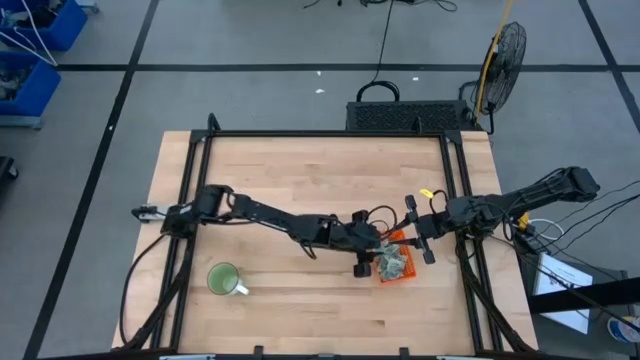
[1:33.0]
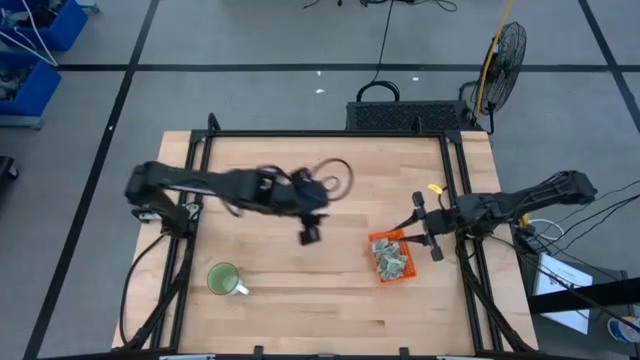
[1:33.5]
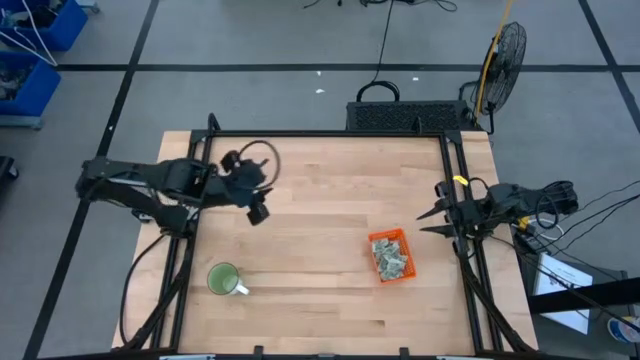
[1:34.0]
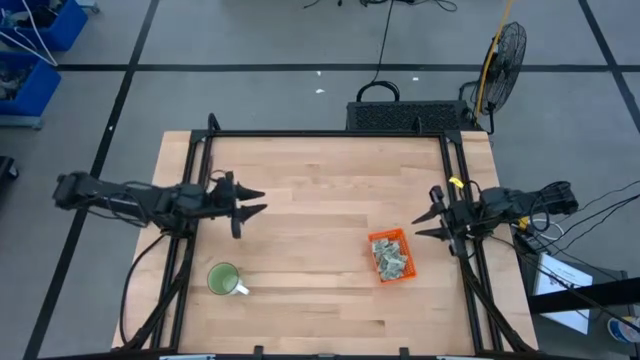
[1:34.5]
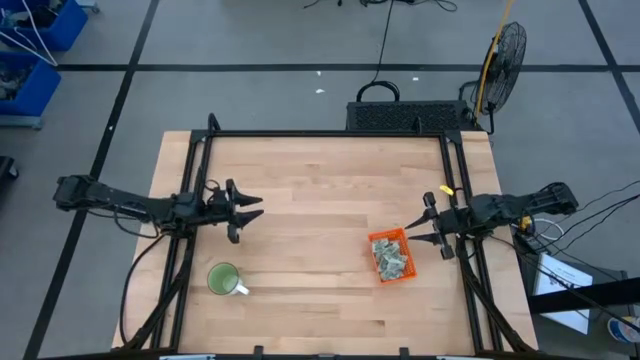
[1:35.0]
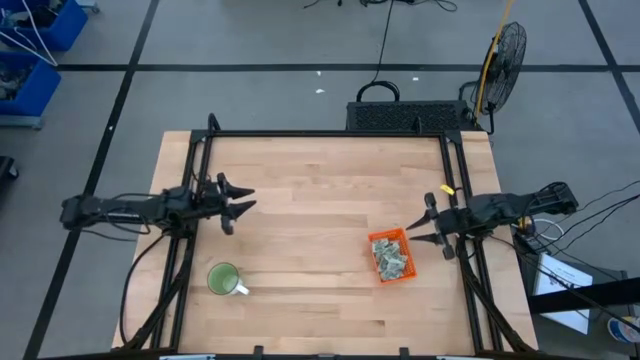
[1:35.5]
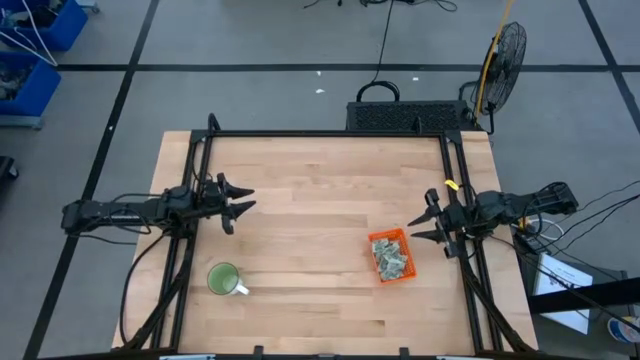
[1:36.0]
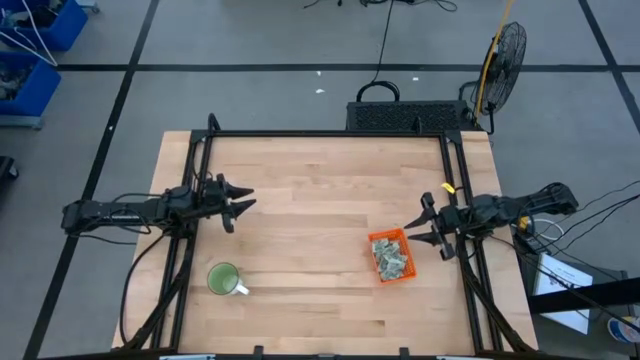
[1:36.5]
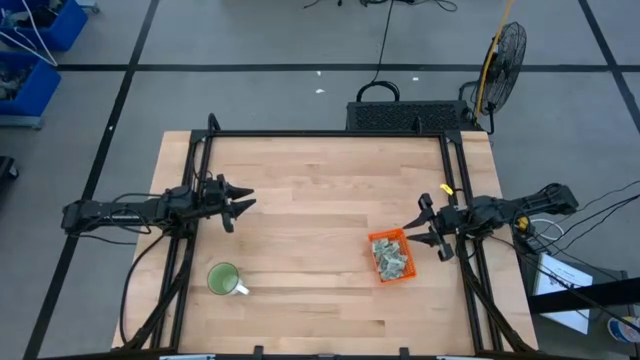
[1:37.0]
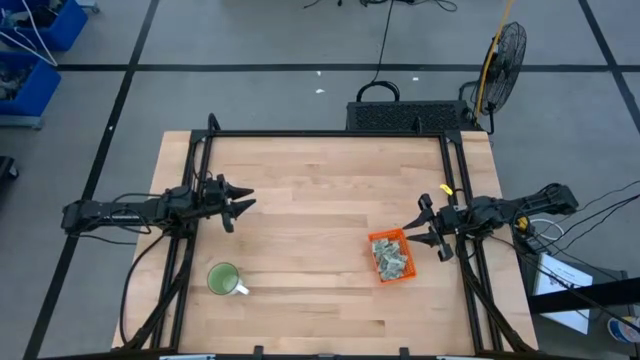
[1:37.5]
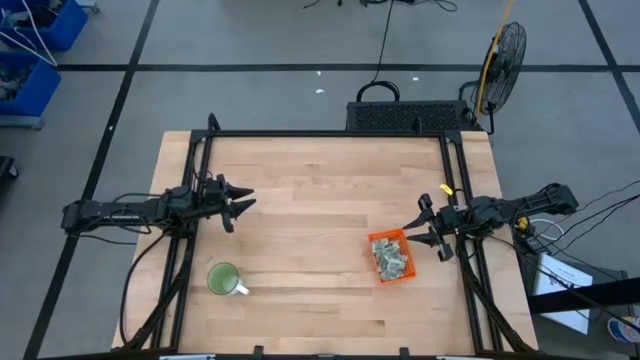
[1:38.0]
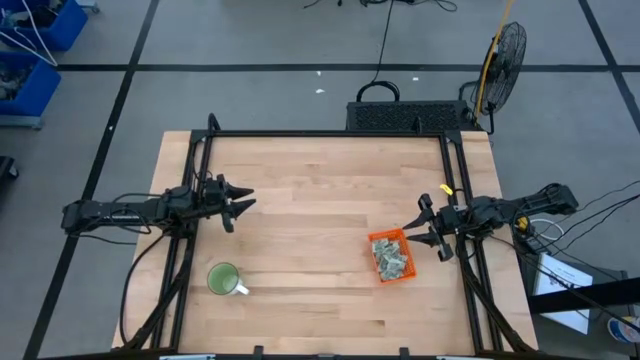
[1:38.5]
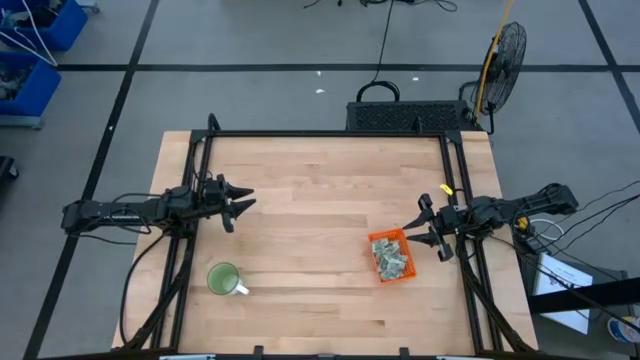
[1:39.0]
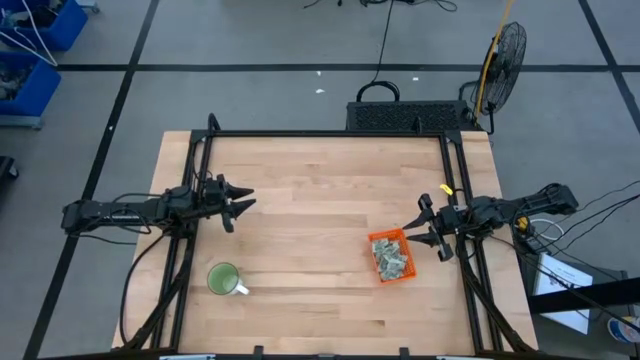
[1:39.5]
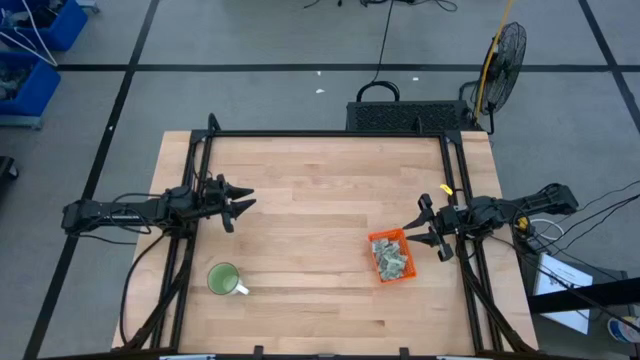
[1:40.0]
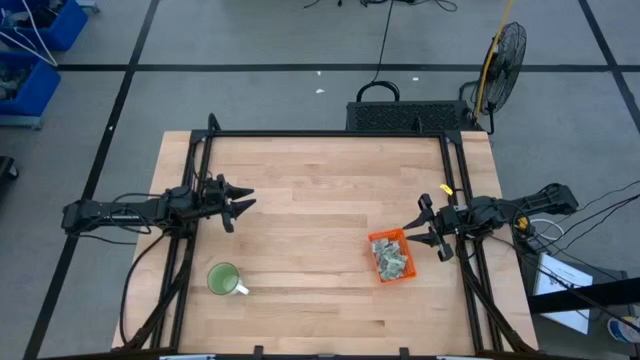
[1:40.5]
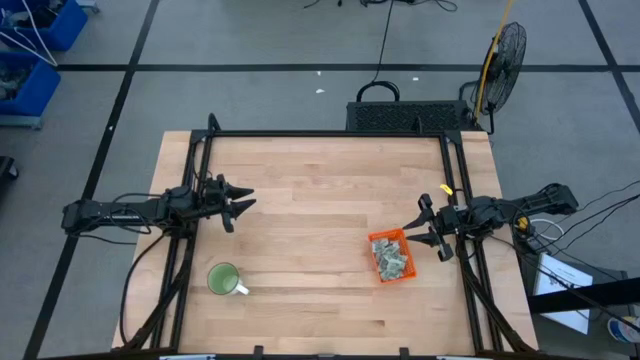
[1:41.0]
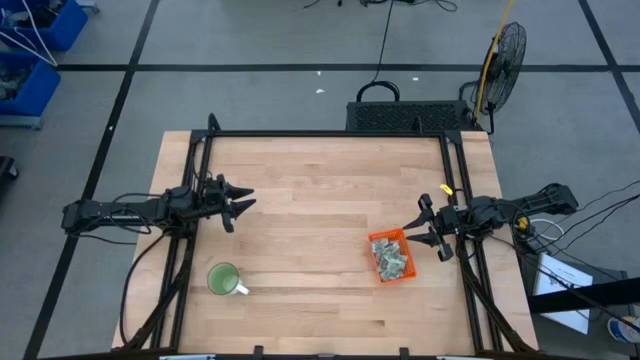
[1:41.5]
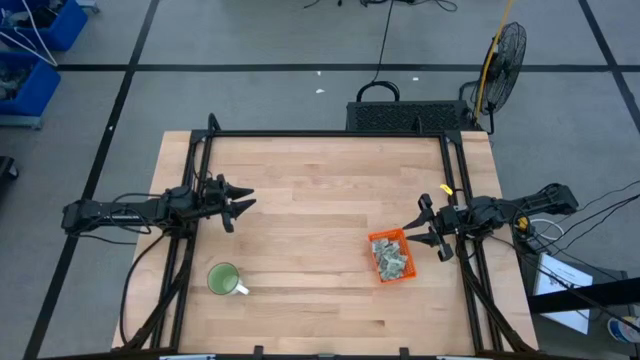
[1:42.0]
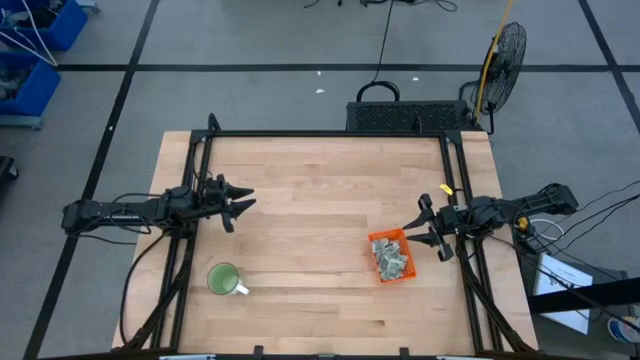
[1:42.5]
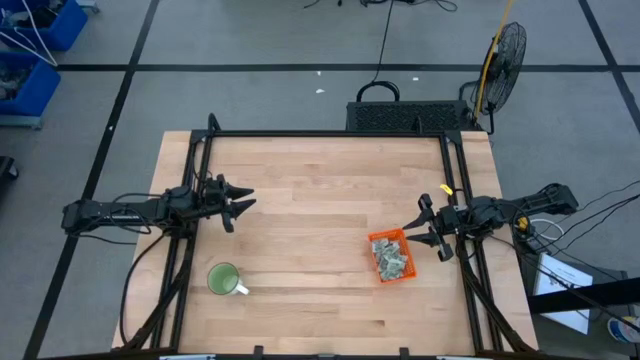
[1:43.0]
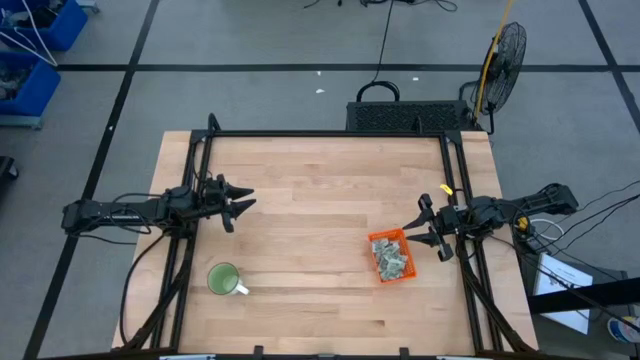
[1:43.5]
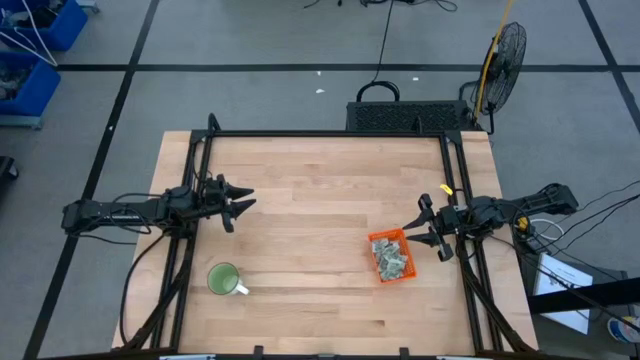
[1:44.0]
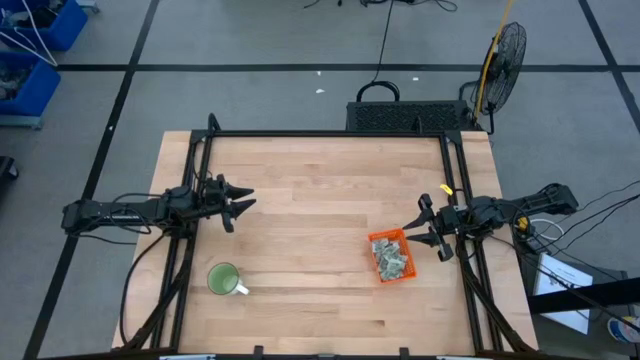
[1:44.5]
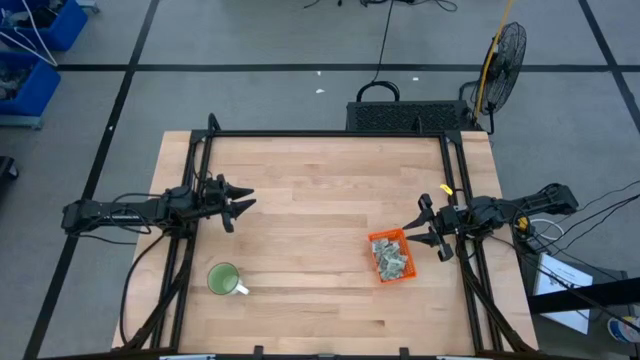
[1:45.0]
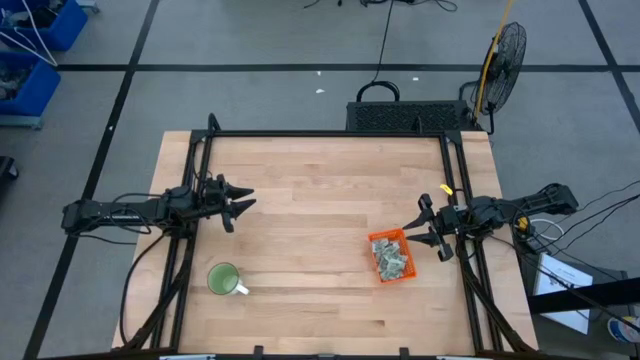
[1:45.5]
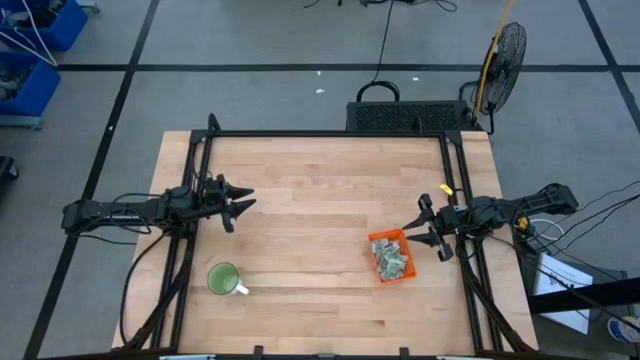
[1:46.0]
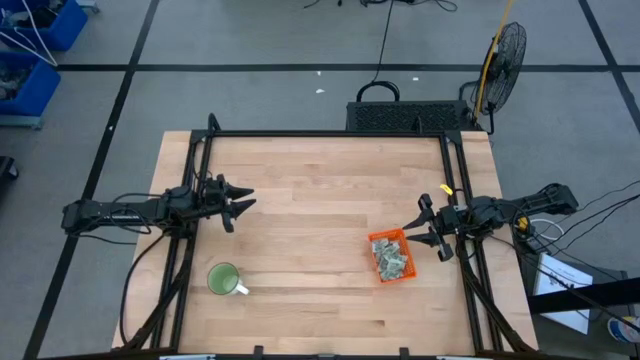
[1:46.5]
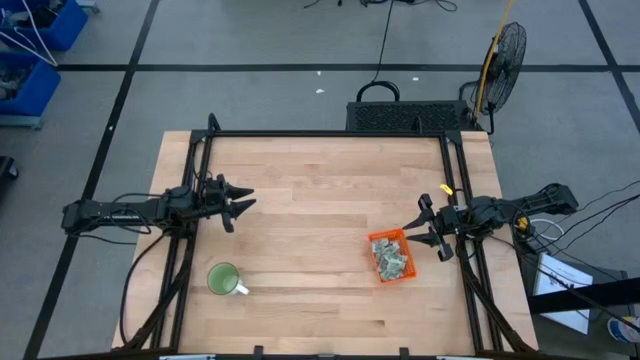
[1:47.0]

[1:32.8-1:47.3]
Task: Pick and place Stevia / Truvia into bins
Return to Home Position

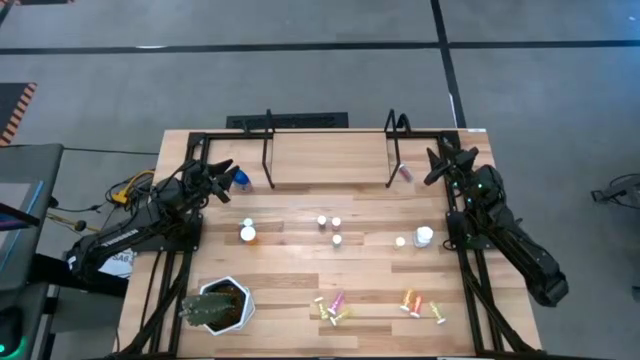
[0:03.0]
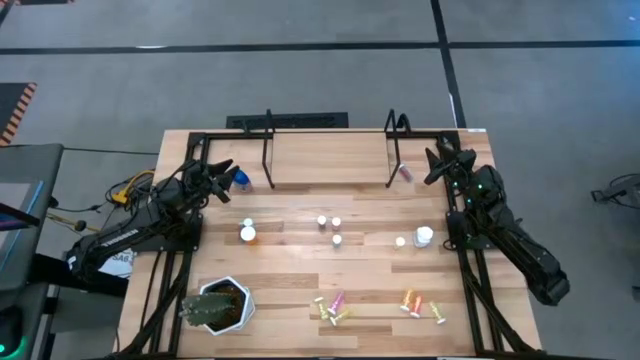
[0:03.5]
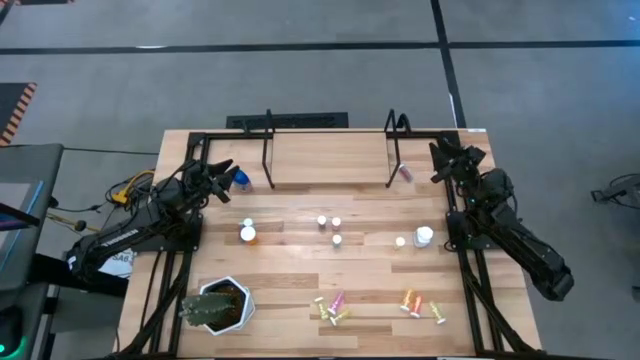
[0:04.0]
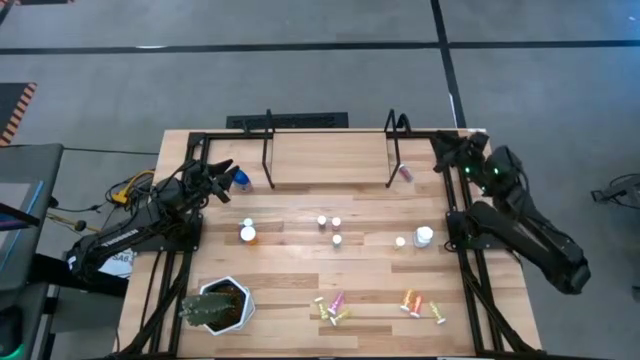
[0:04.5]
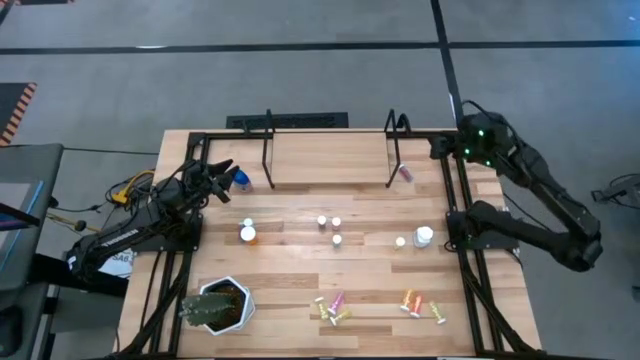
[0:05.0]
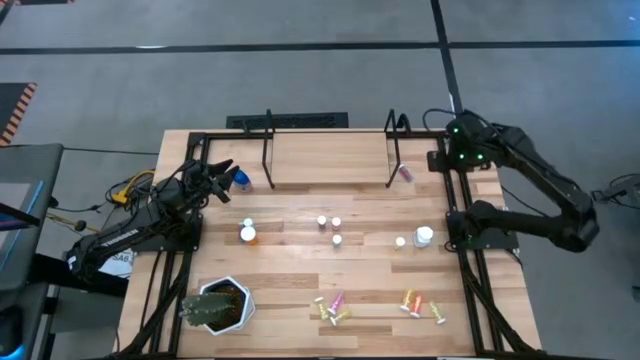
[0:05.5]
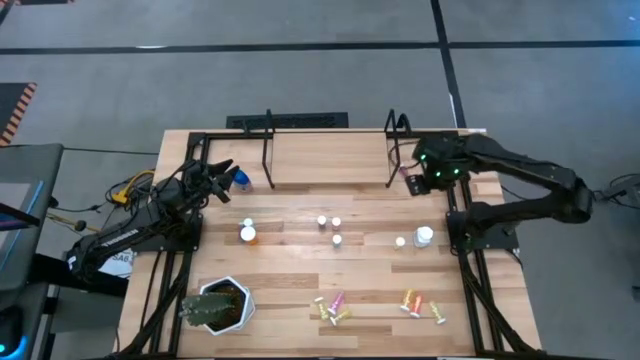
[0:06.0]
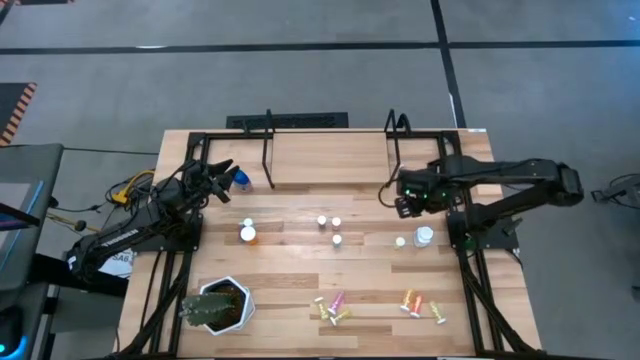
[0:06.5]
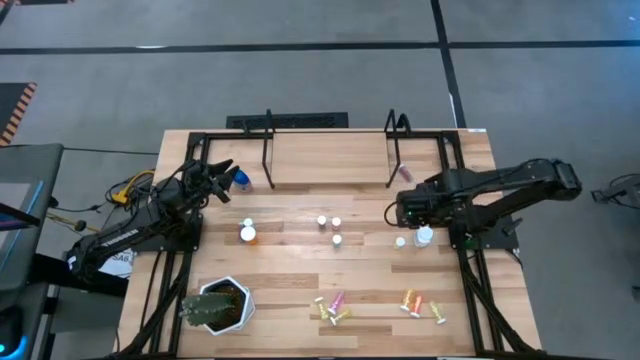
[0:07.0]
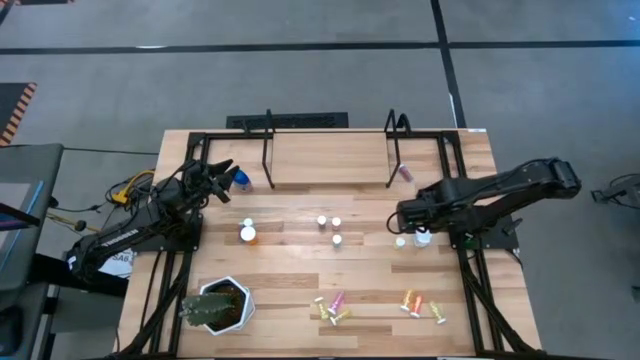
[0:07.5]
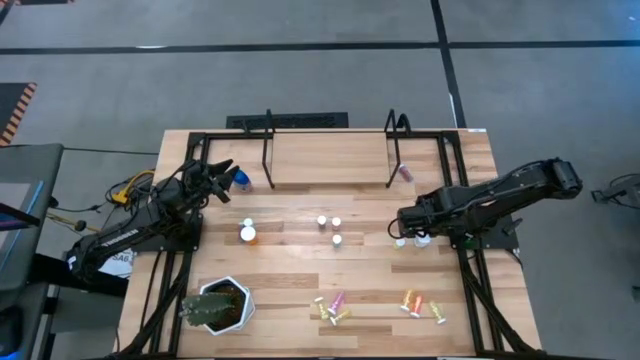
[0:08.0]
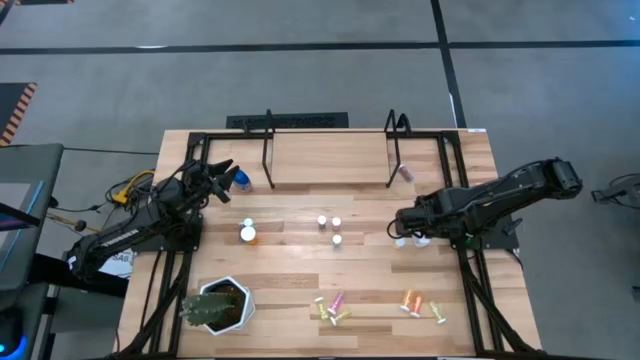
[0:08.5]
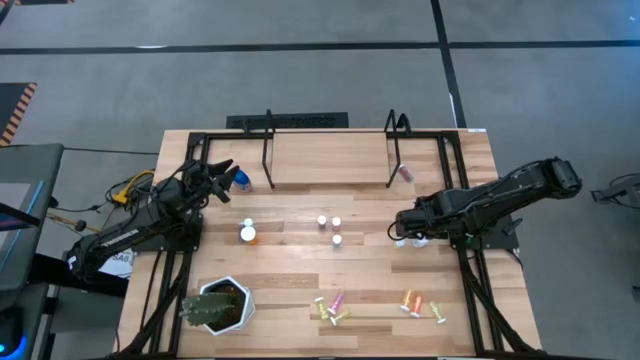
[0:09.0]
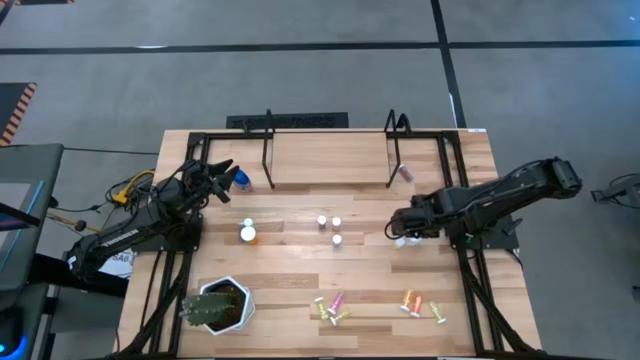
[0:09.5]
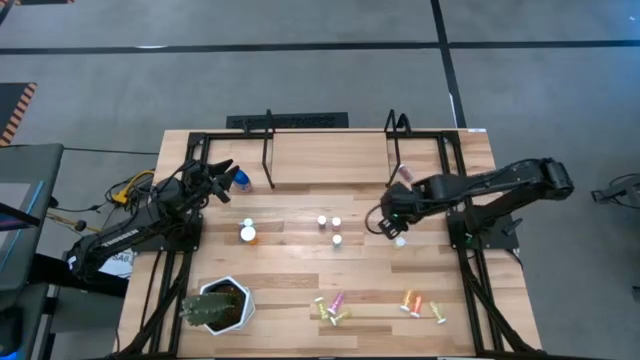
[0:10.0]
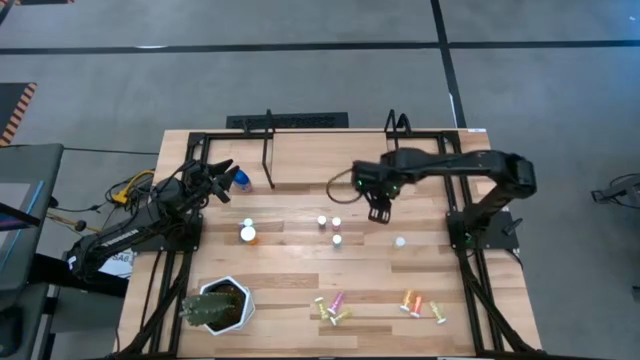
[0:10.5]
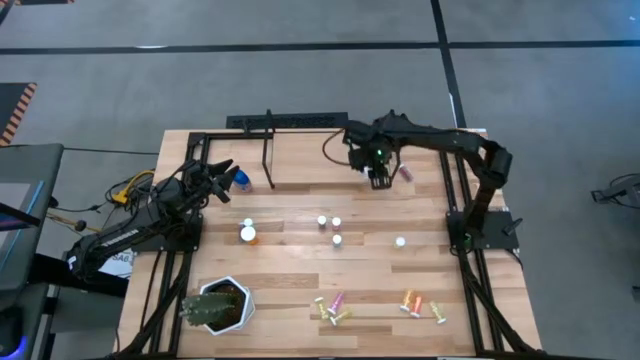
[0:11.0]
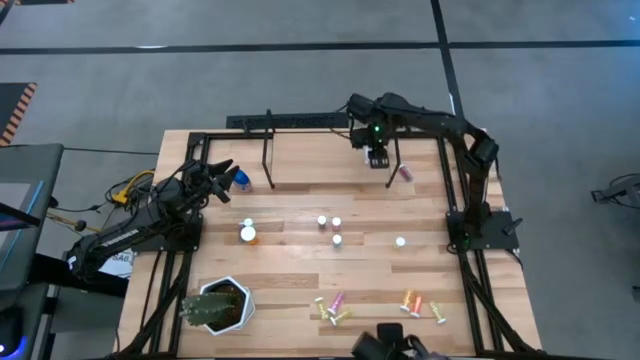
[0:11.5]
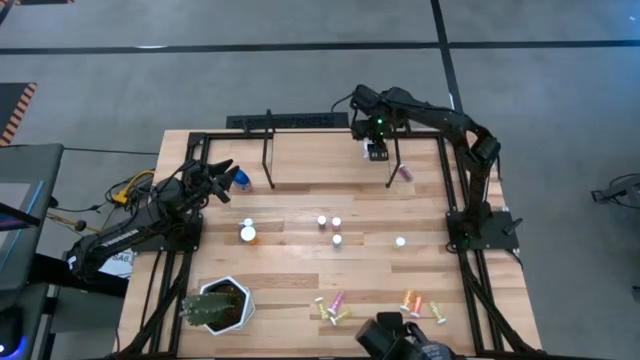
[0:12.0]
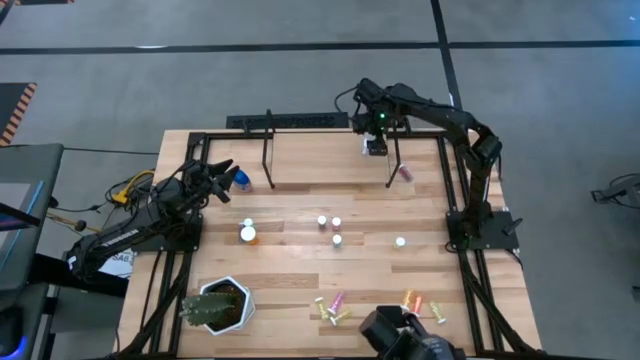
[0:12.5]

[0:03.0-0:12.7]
Task: Pick and place medicine bottles onto shelf by color
Put the white pill bottle on the shelf
